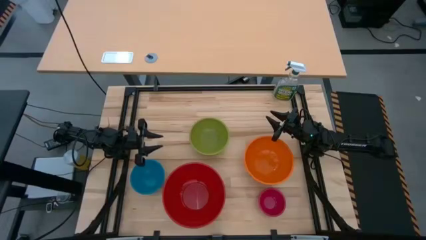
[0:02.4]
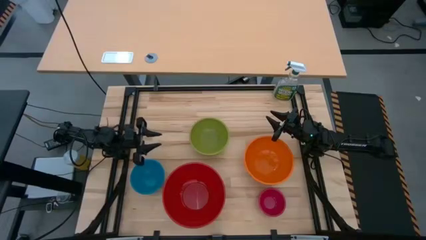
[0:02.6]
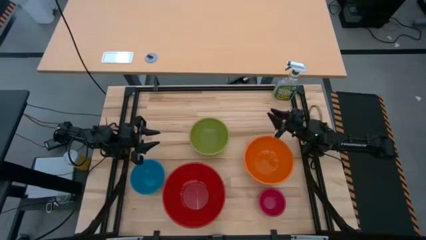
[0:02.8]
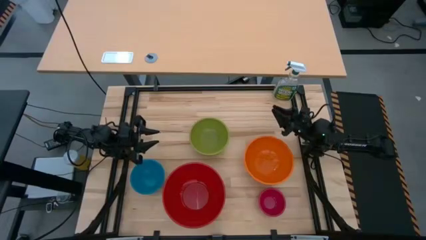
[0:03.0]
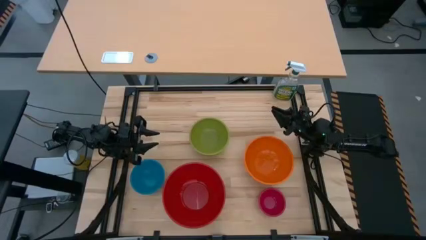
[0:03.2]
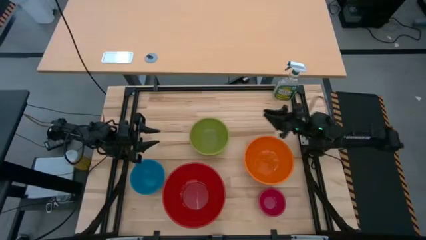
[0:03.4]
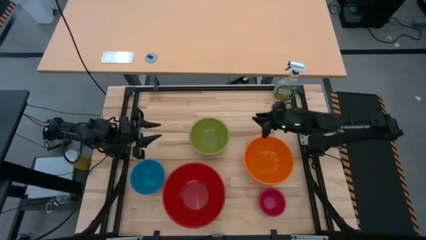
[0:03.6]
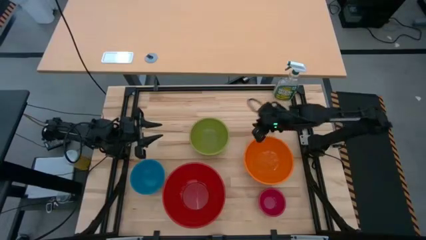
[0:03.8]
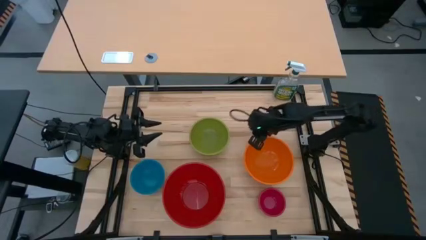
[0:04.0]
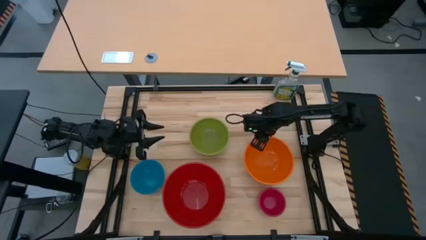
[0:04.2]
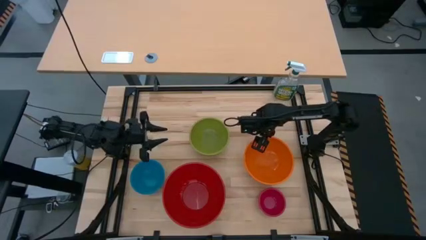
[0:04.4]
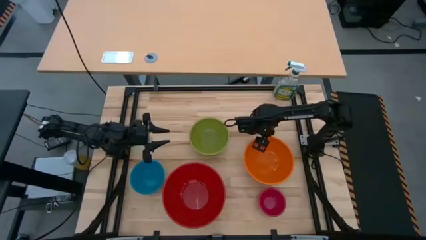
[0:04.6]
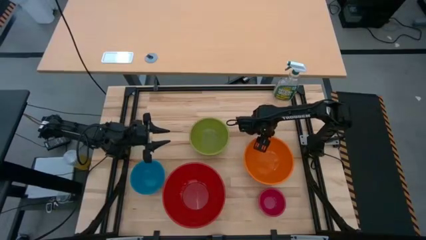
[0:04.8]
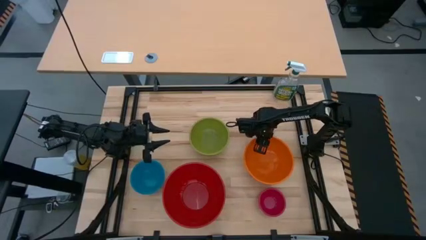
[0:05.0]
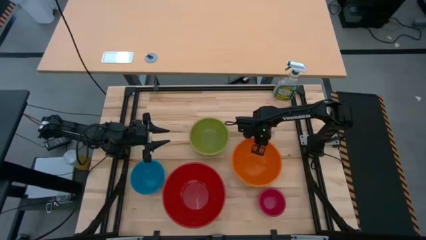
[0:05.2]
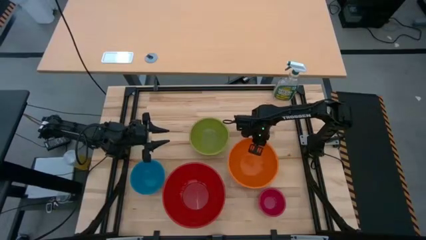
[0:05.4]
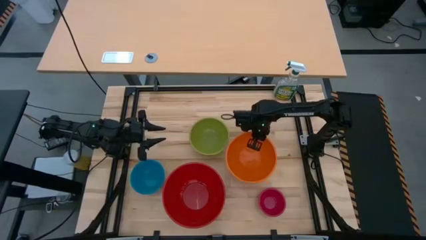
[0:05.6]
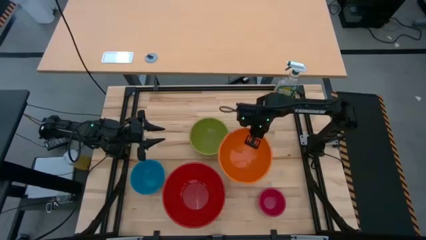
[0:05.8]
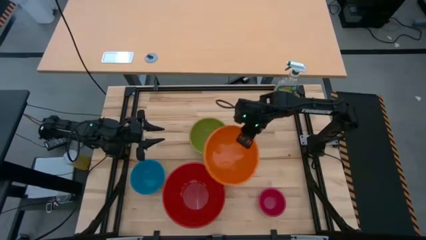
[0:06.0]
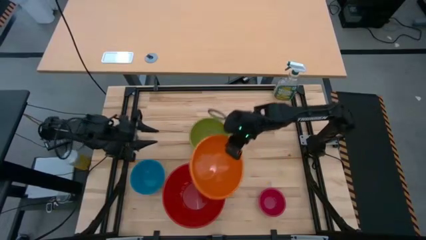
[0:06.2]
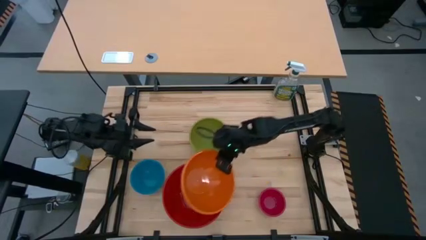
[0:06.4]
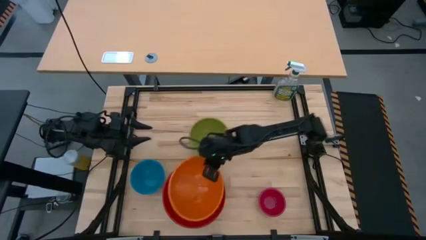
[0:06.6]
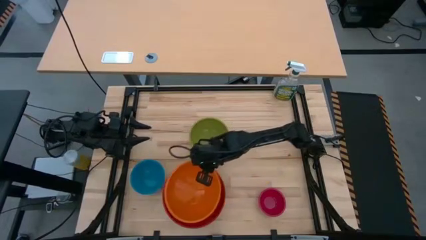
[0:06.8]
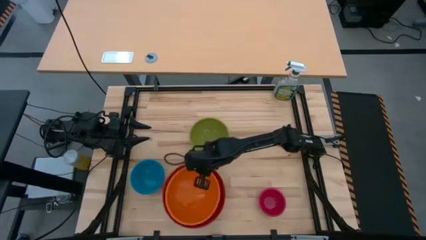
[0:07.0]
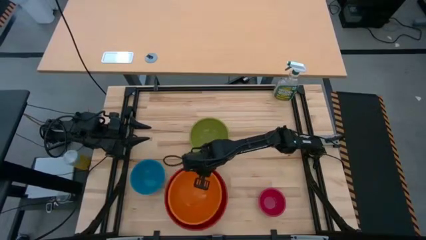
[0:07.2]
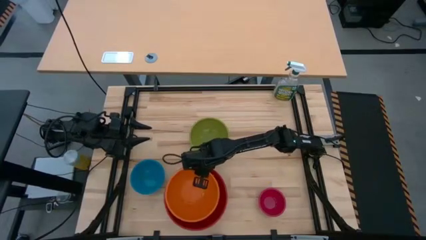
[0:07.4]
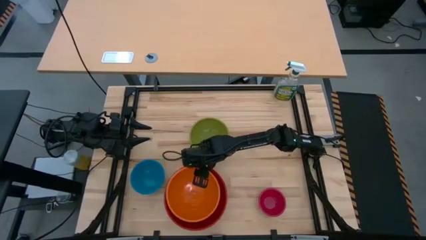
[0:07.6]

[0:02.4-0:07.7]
Stack the orange bowl on top of the large red bowl

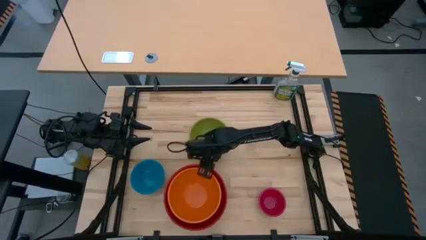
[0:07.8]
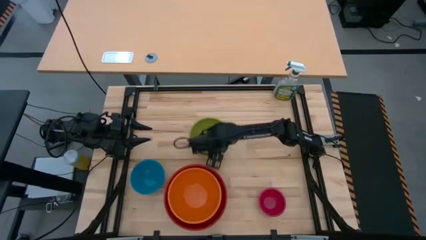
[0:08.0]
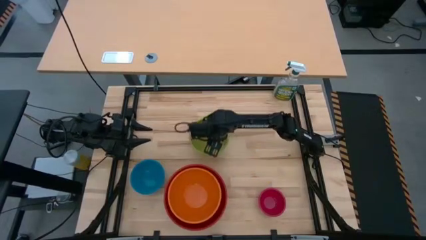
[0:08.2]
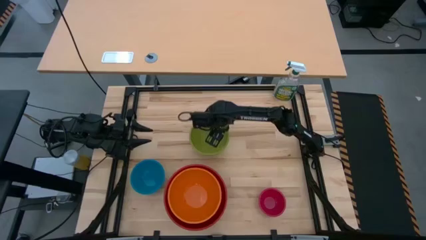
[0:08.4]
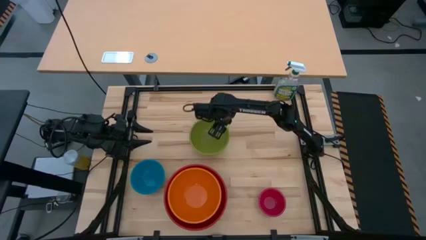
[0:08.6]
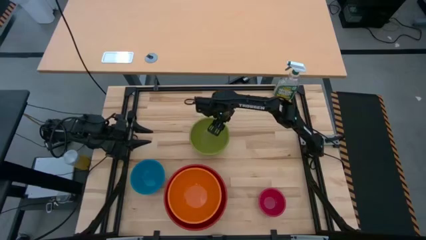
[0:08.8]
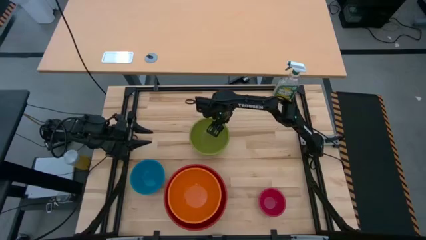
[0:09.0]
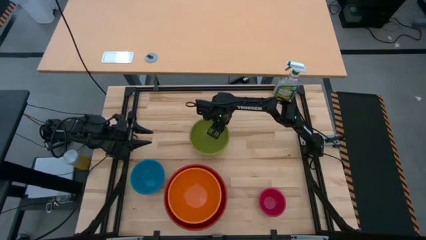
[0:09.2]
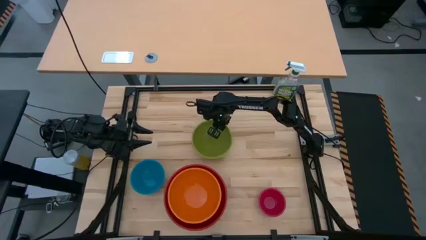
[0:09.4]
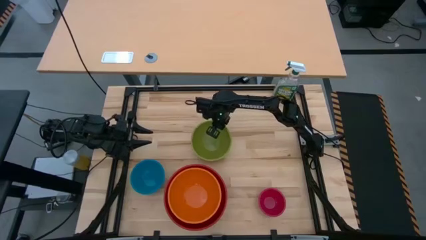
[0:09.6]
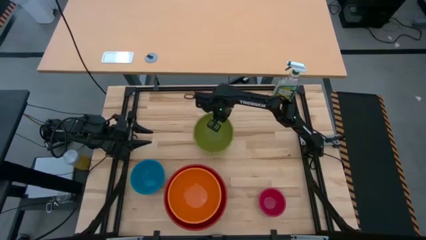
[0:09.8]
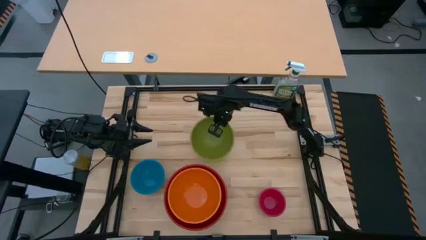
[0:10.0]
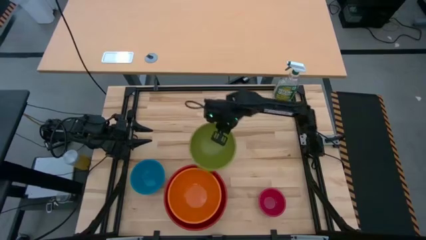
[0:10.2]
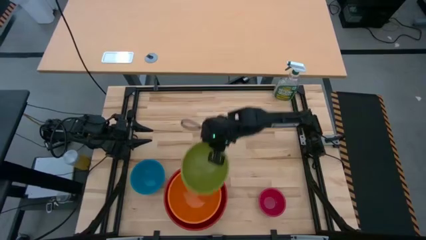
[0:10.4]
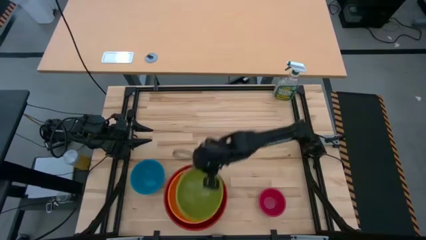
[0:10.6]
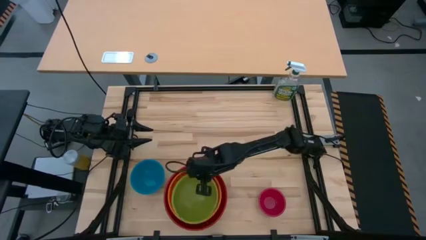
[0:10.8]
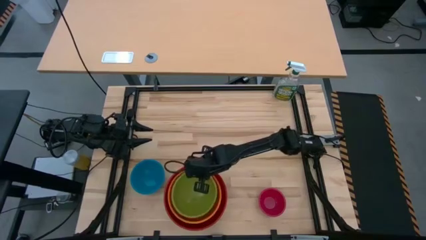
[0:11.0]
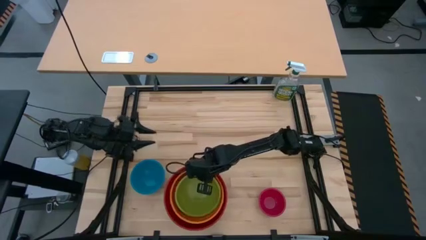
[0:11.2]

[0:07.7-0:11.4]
Stack the green bowl on top of the orange bowl

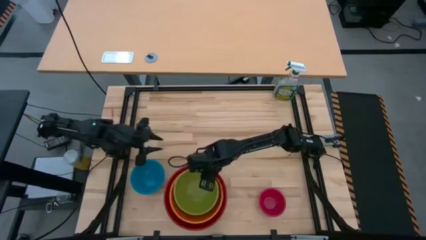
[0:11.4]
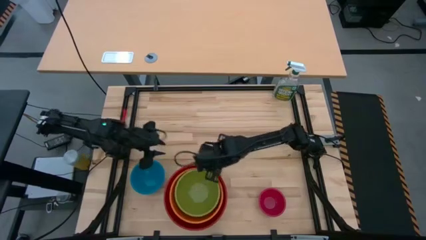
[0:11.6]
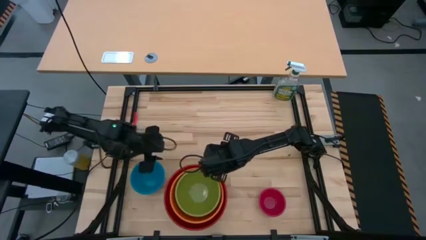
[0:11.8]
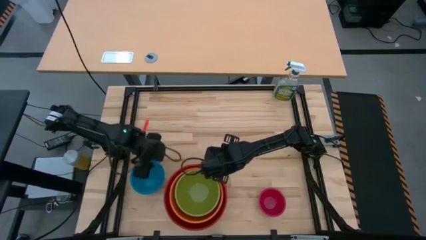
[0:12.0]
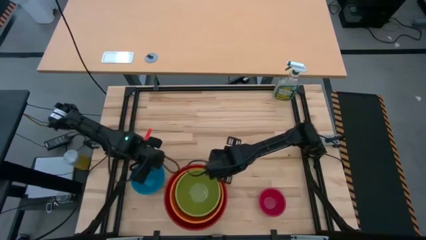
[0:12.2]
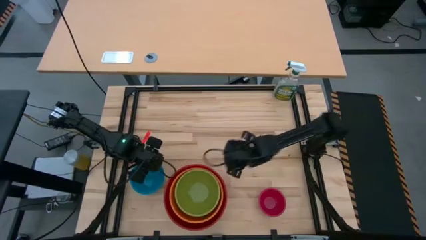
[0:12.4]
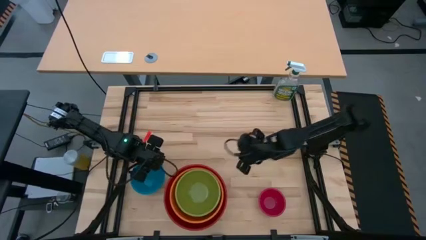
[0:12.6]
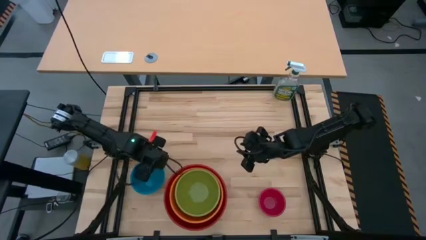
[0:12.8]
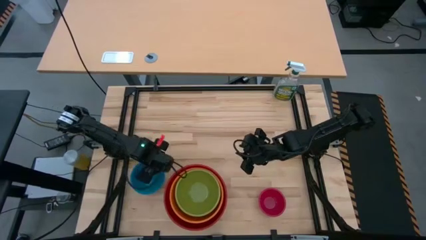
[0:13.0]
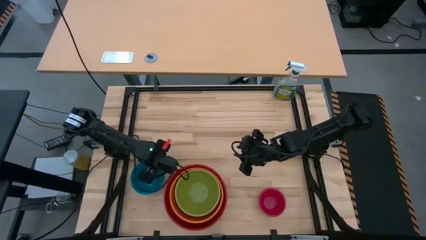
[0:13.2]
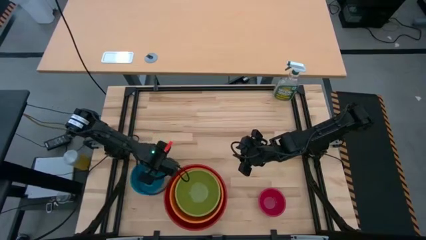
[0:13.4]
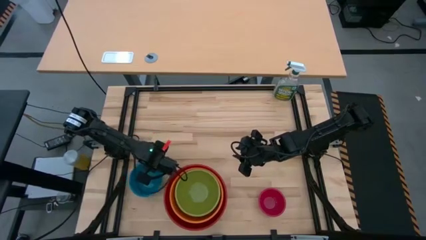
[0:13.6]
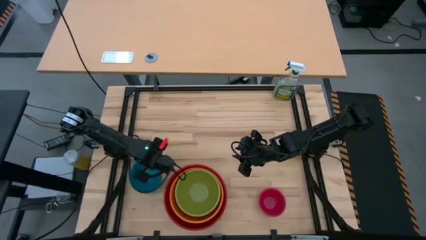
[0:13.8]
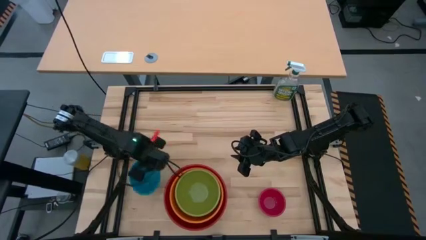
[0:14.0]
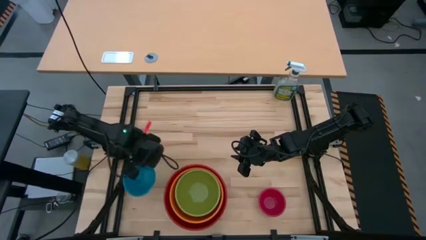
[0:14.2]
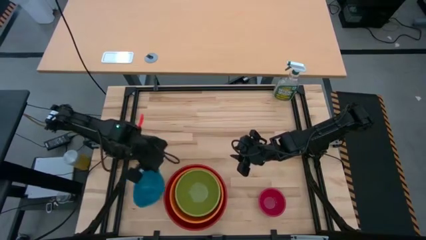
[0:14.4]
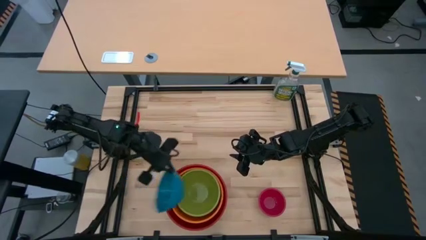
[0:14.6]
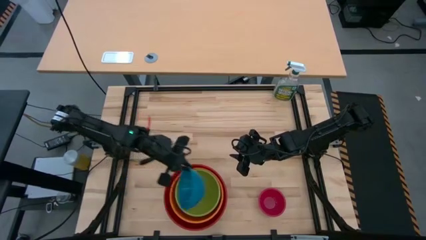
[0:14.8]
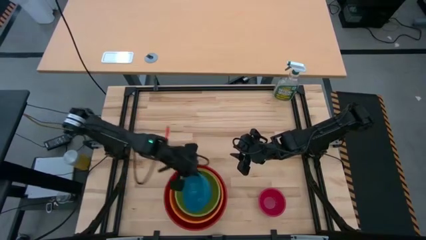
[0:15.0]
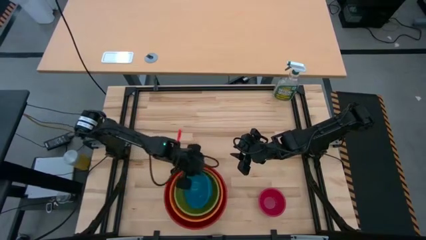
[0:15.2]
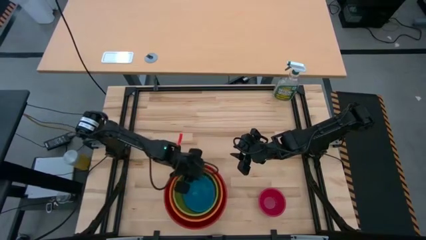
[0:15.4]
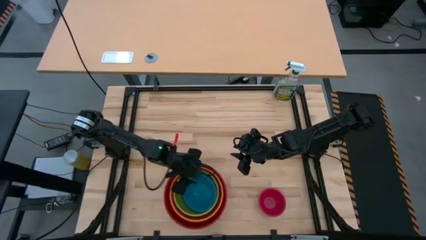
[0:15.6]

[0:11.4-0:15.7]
Stack the blue bowl on top of the green bowl

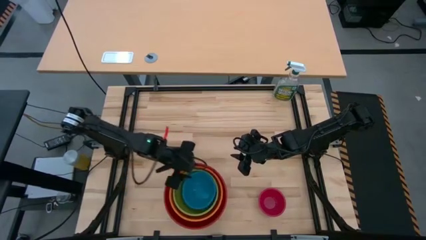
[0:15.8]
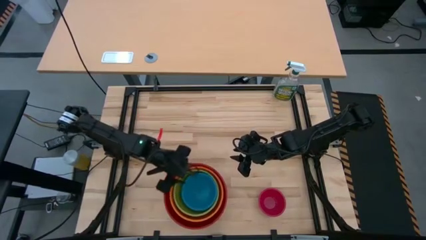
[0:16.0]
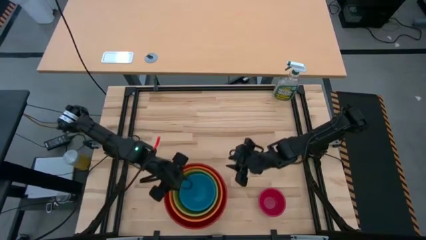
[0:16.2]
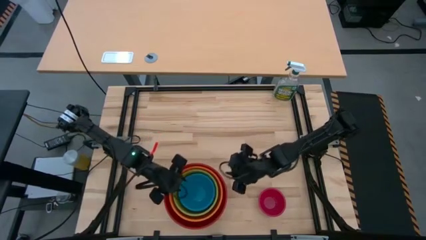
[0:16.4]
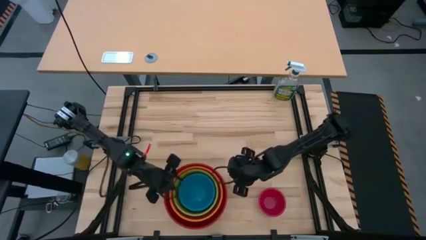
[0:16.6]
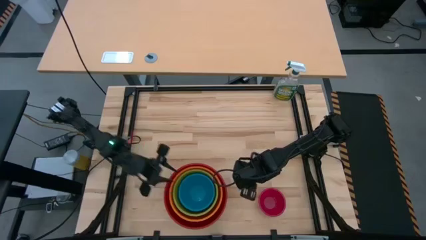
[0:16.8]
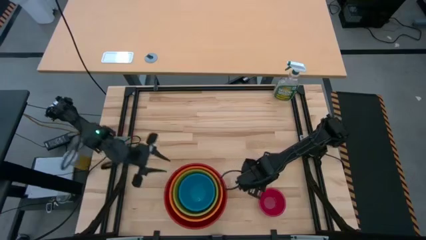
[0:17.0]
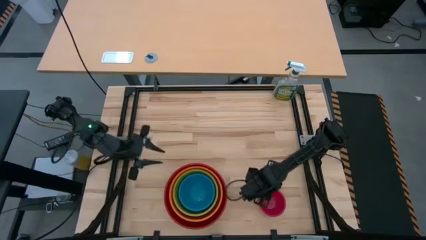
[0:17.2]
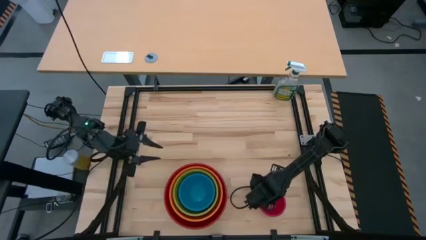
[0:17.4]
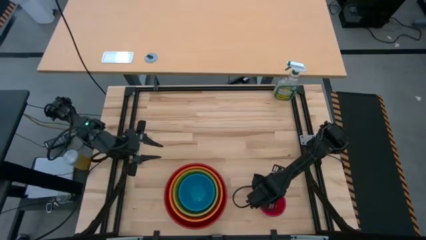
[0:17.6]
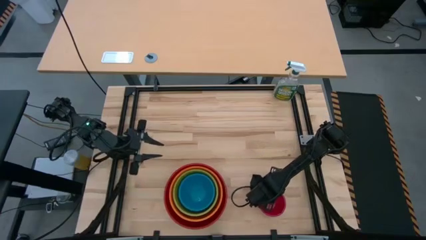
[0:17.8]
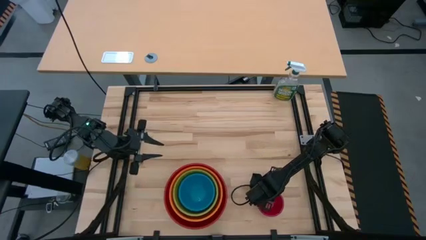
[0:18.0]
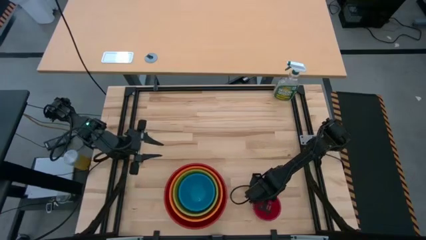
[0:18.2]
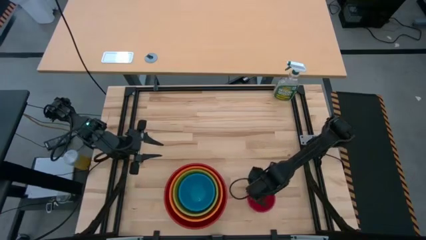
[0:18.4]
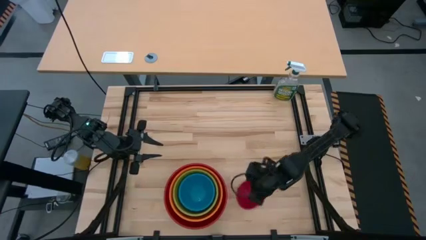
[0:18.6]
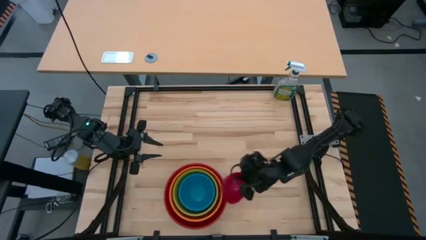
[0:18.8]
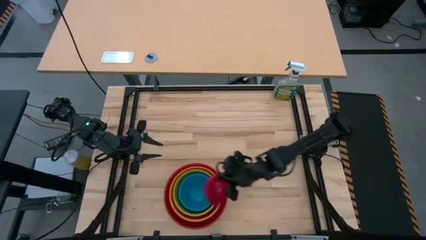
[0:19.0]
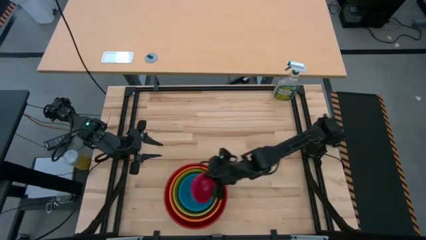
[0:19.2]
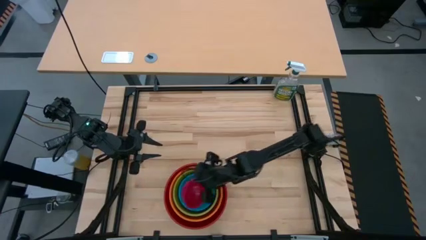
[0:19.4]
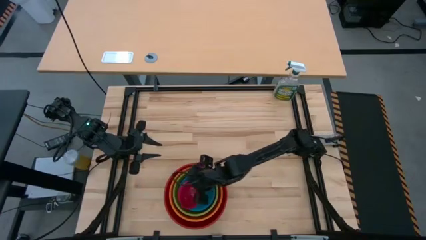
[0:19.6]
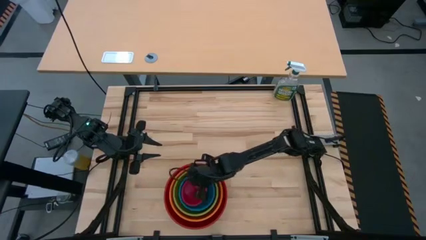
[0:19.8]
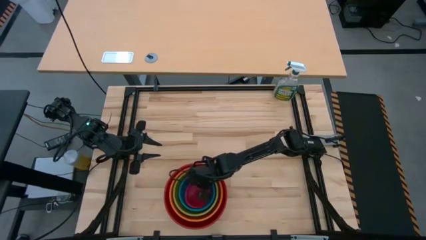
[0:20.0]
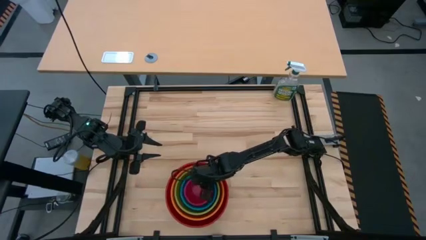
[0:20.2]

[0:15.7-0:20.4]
Stack the small red bowl on top of the blue bowl
